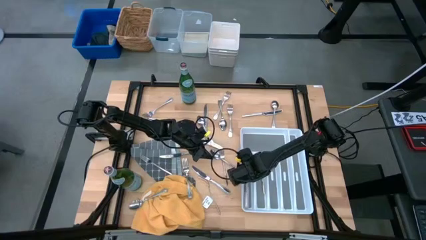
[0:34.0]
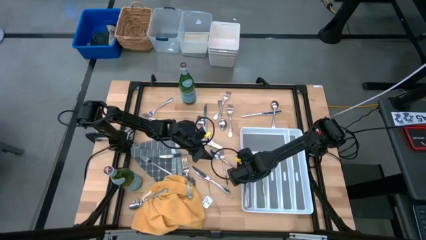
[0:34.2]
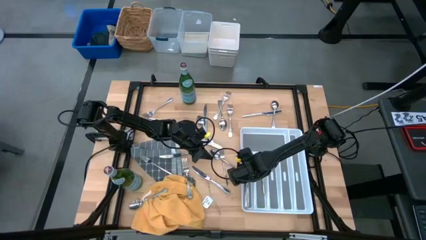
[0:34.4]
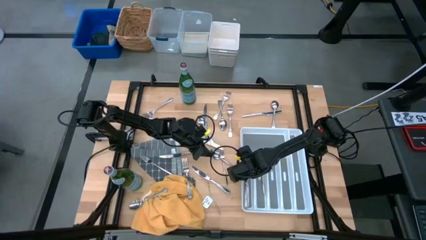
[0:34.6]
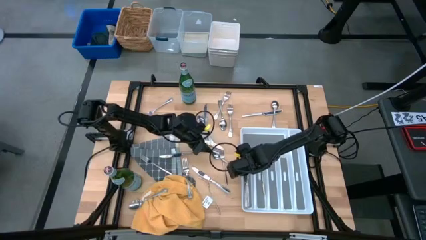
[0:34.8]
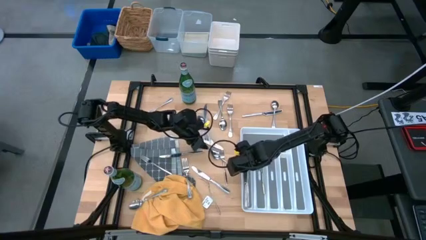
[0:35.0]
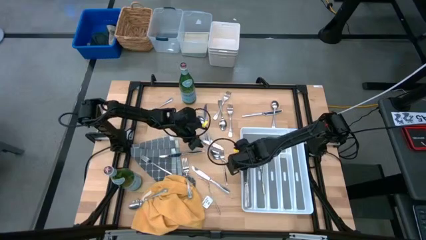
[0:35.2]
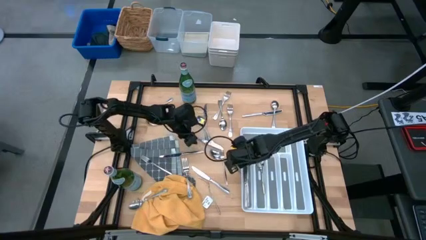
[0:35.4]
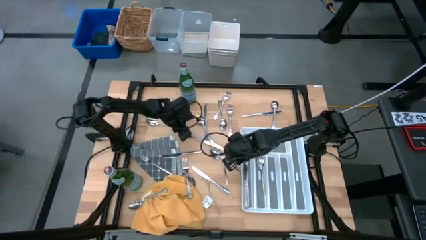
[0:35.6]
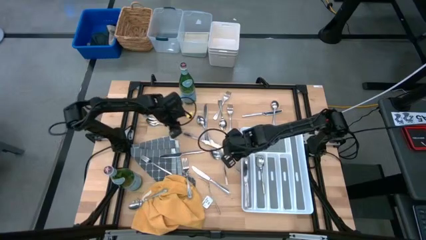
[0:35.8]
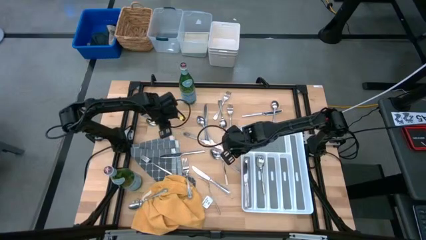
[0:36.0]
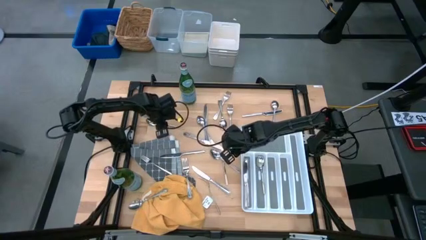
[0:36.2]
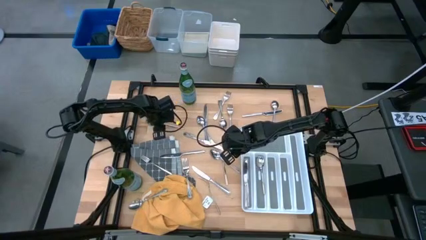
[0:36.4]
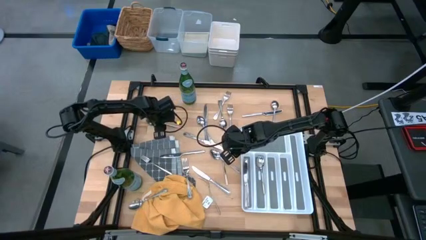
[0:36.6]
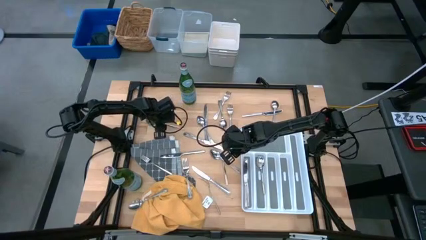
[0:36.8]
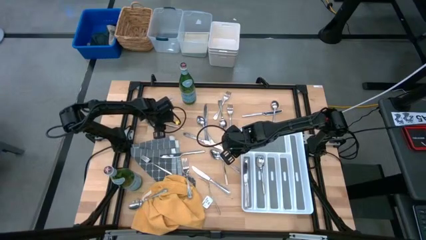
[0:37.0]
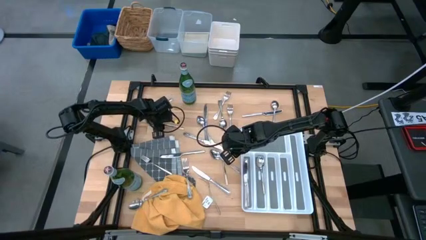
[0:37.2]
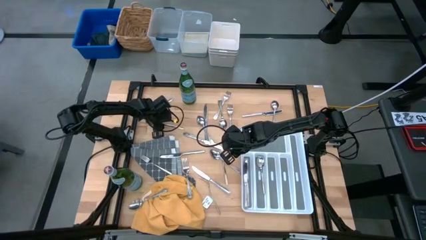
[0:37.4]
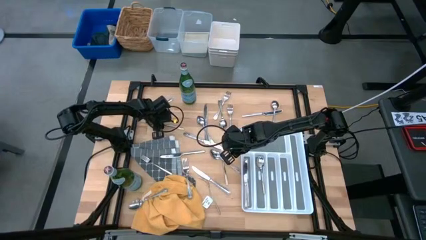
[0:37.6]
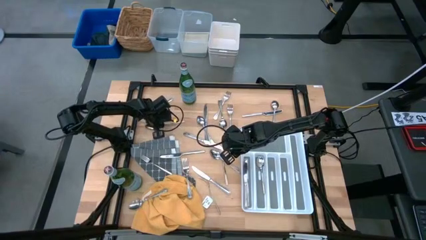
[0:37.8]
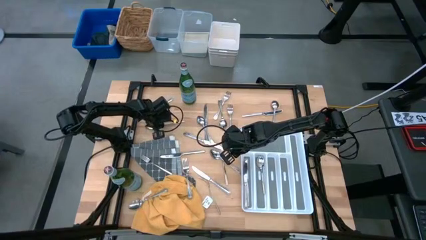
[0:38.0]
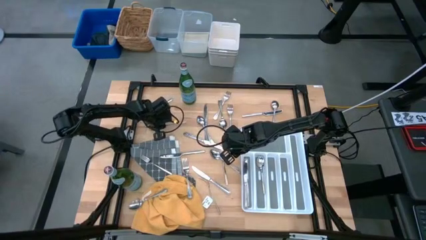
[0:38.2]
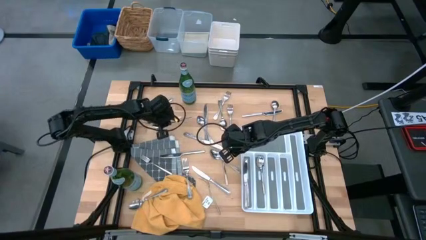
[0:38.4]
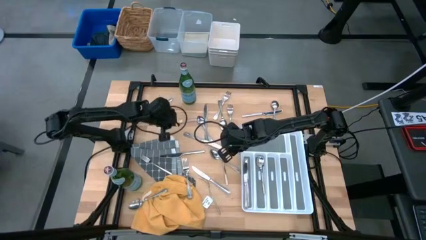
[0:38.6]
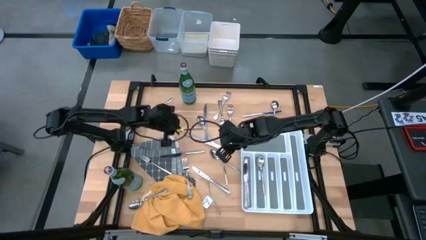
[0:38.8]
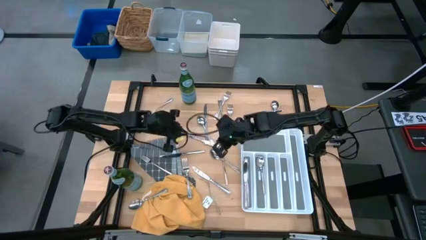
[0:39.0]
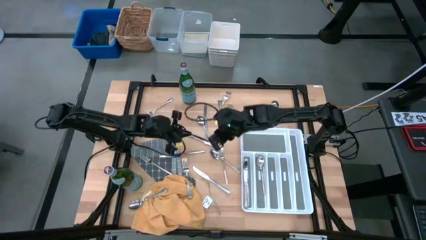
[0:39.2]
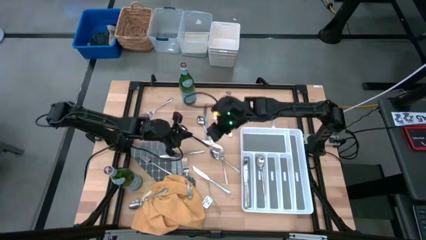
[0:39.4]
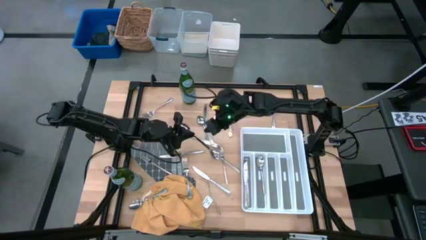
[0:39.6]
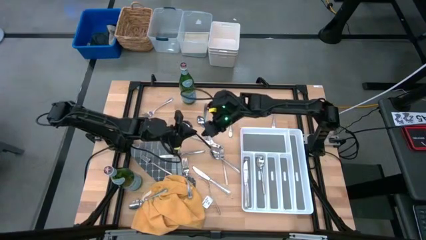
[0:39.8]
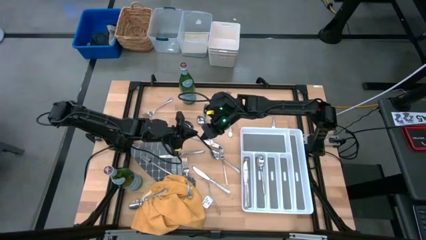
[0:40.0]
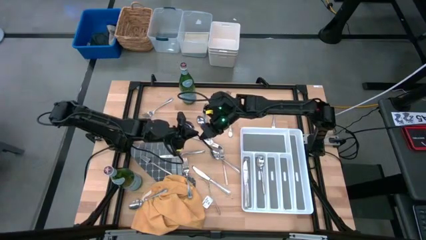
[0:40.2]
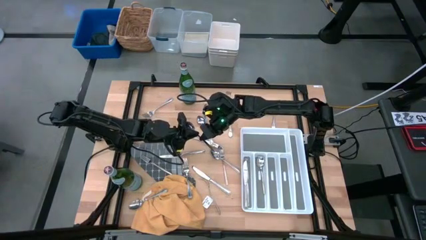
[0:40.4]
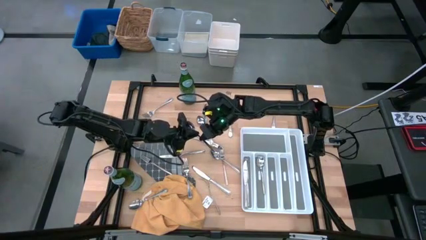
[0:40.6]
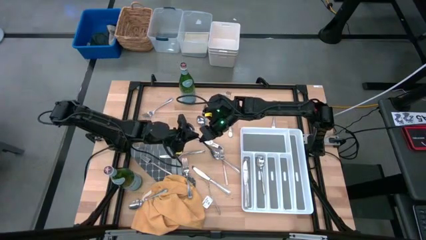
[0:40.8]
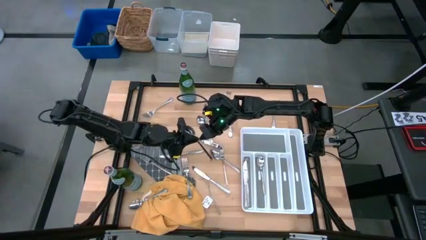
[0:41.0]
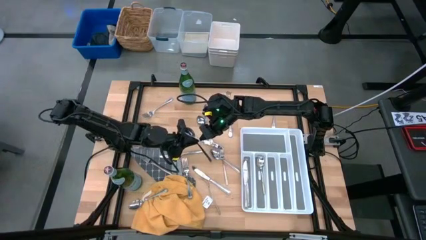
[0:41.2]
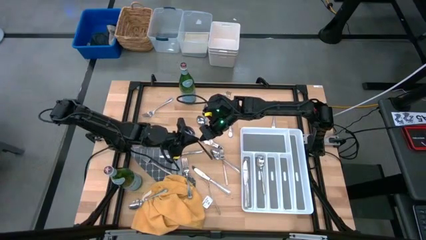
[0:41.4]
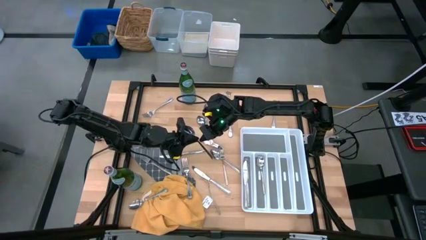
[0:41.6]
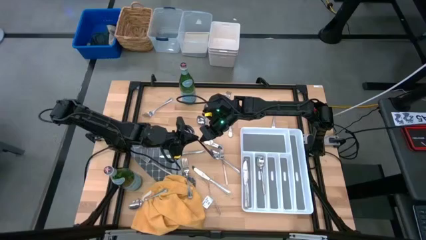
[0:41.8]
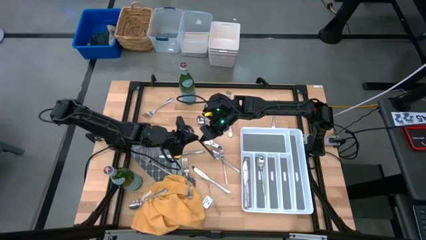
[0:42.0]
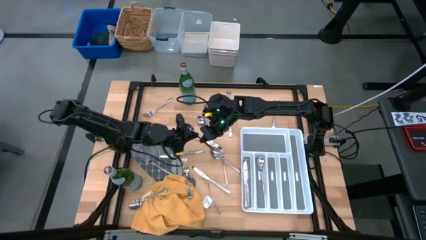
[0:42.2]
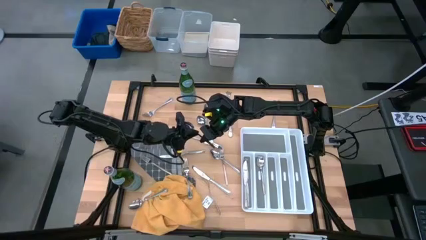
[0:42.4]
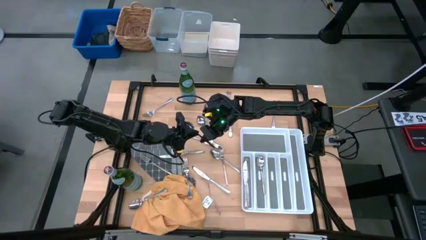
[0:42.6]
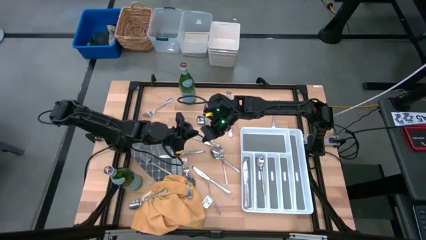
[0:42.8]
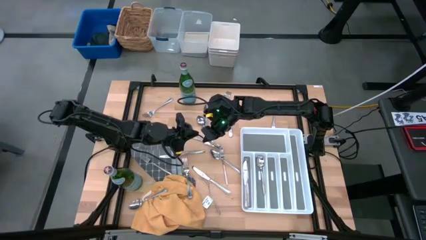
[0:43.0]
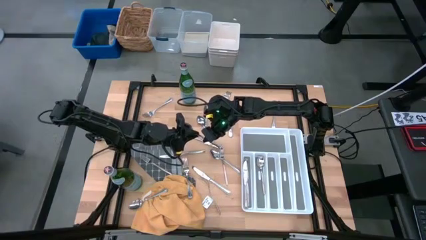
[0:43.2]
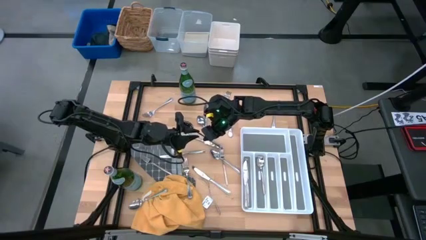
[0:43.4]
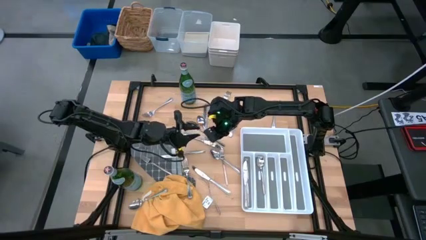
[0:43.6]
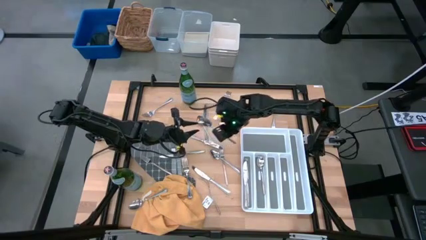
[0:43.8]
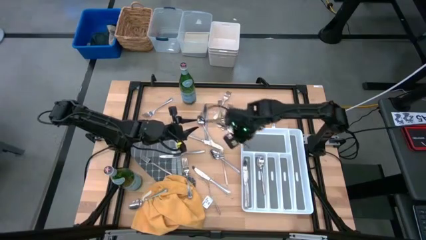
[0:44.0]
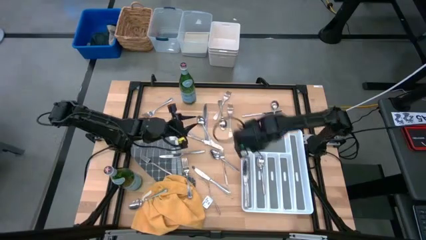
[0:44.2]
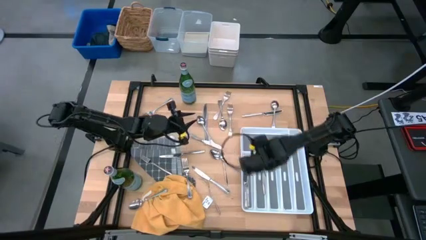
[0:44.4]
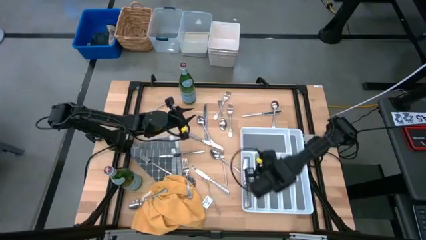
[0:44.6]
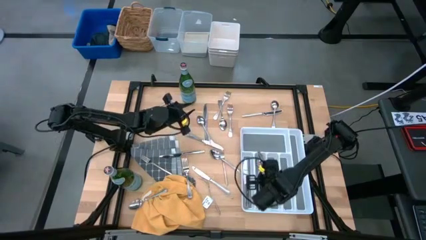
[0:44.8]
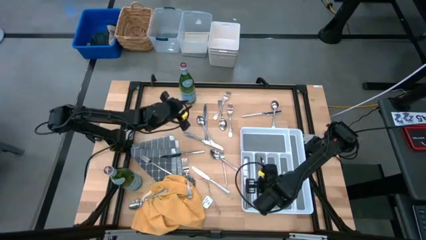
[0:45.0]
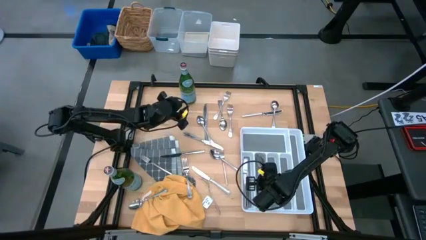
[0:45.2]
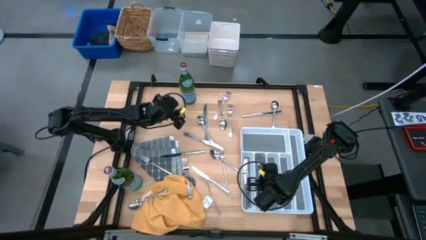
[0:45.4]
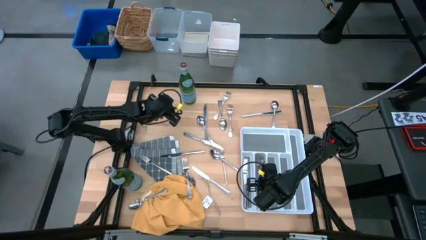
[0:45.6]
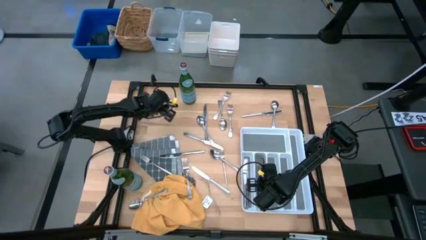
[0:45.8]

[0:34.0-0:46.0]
Stack the silver spoon into the white utensil tray with the other silver spoon
